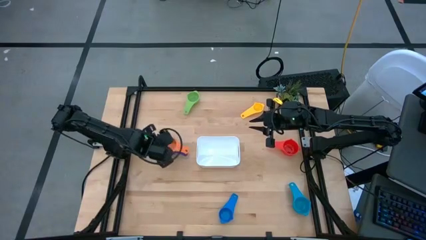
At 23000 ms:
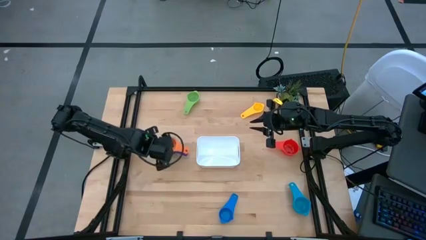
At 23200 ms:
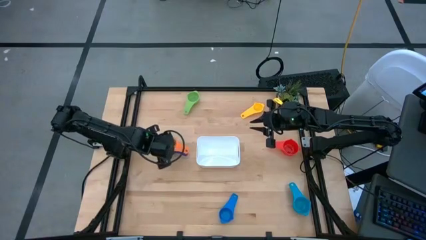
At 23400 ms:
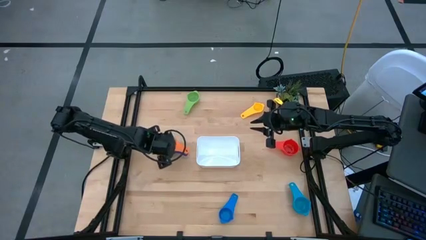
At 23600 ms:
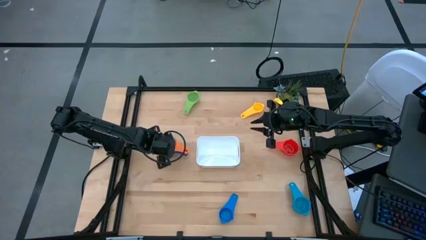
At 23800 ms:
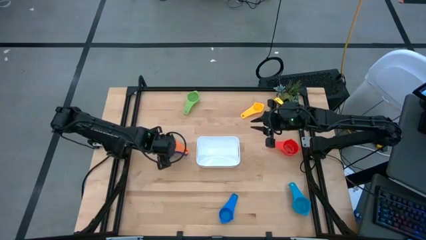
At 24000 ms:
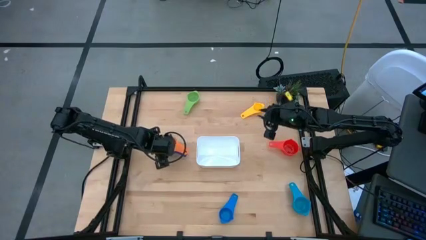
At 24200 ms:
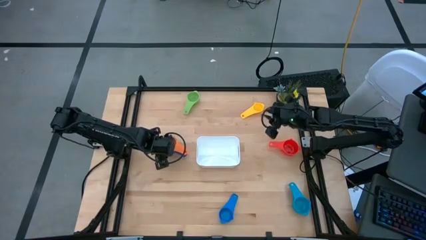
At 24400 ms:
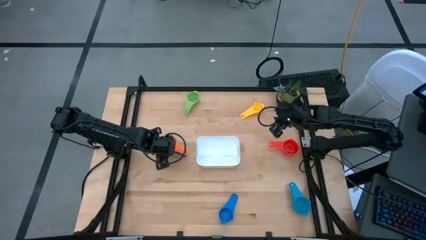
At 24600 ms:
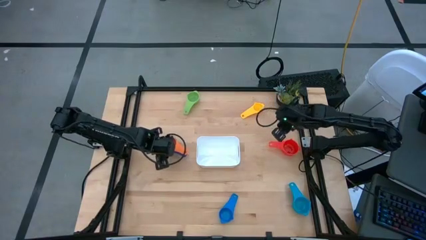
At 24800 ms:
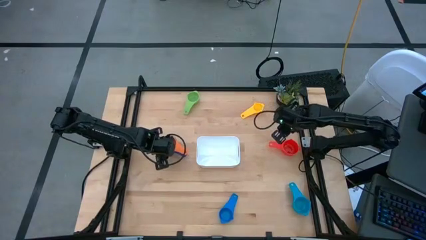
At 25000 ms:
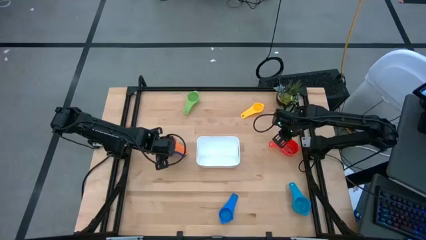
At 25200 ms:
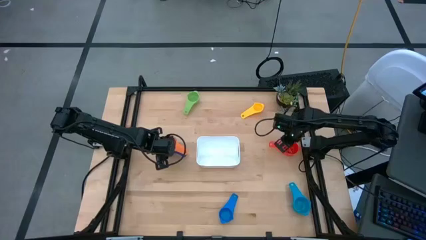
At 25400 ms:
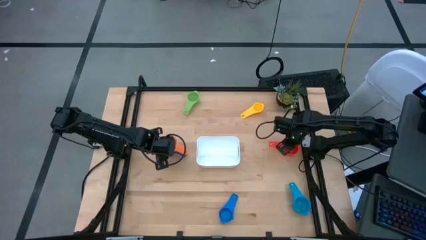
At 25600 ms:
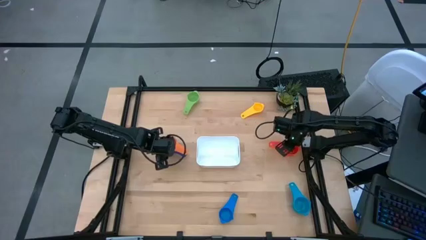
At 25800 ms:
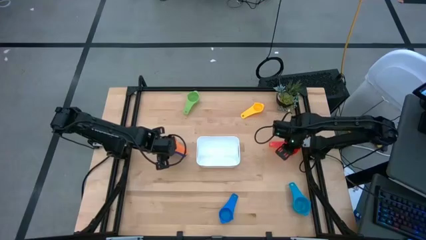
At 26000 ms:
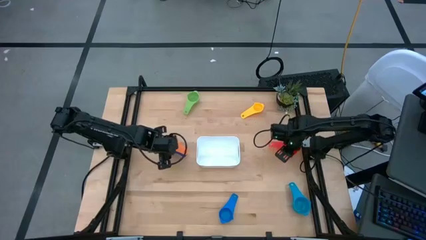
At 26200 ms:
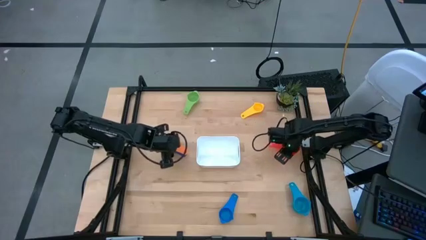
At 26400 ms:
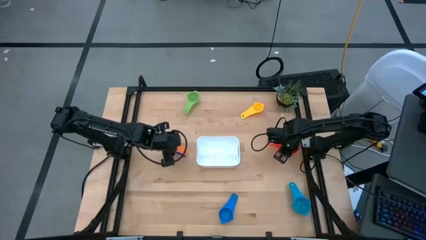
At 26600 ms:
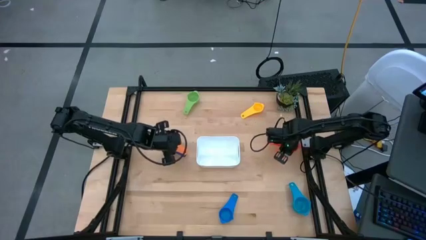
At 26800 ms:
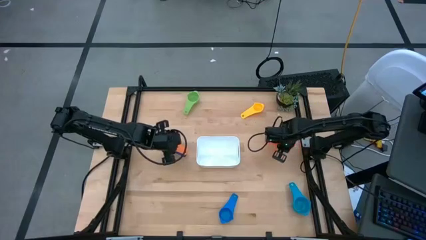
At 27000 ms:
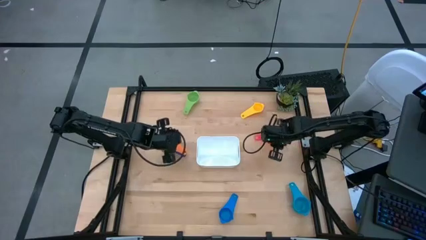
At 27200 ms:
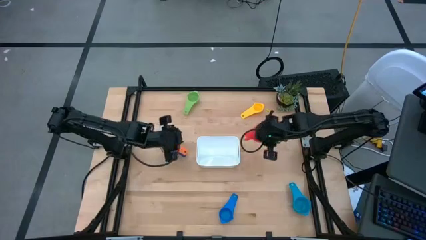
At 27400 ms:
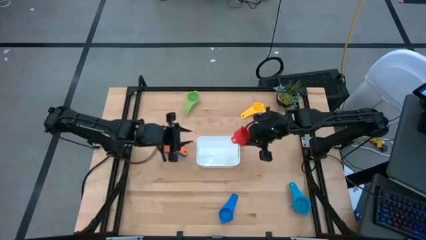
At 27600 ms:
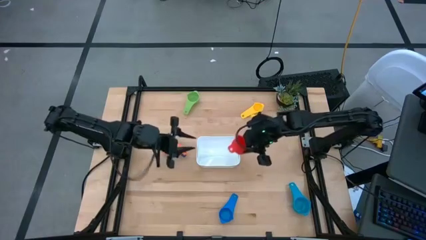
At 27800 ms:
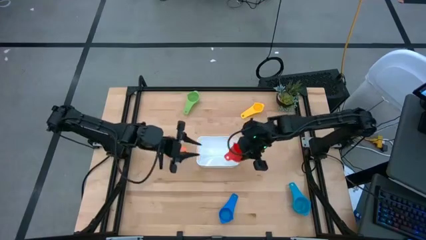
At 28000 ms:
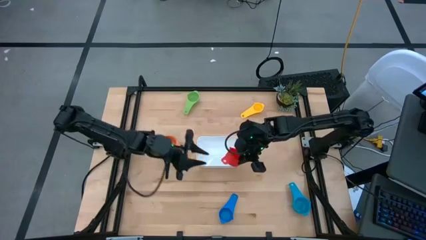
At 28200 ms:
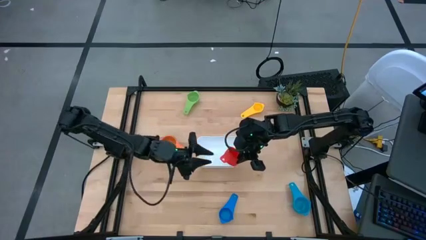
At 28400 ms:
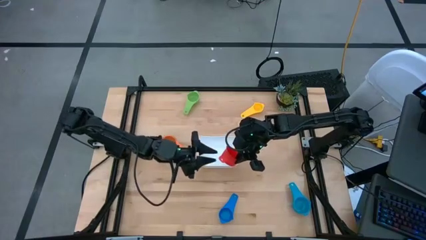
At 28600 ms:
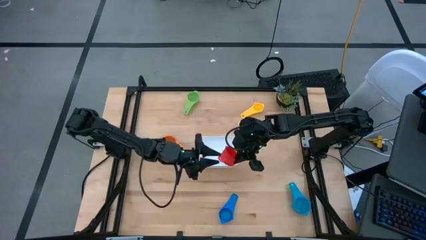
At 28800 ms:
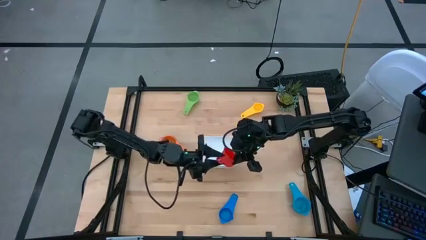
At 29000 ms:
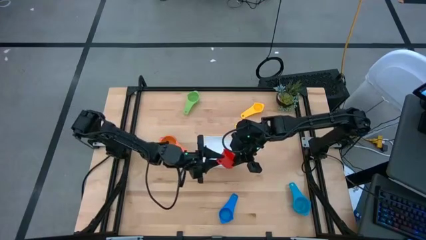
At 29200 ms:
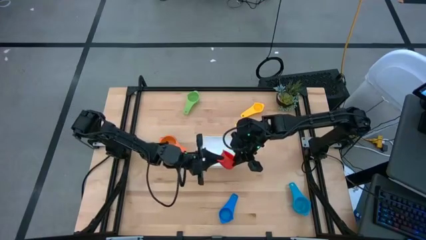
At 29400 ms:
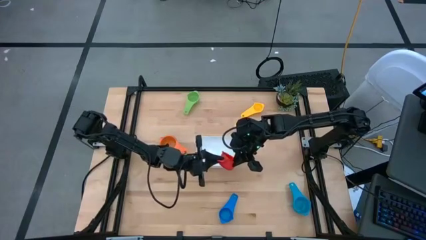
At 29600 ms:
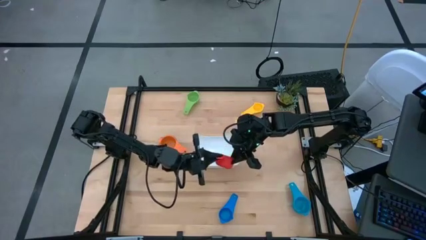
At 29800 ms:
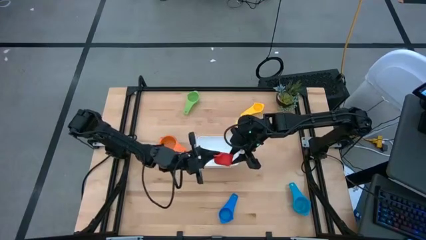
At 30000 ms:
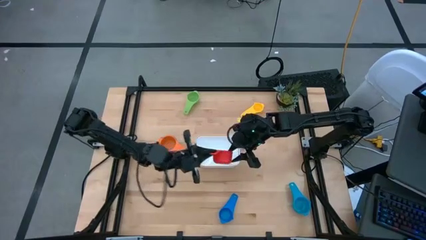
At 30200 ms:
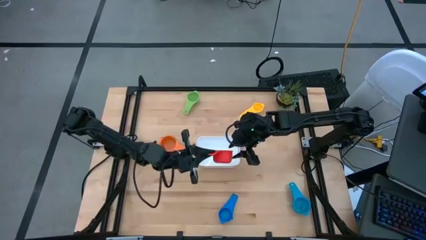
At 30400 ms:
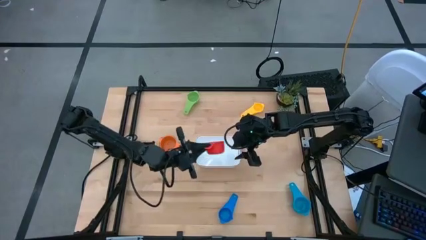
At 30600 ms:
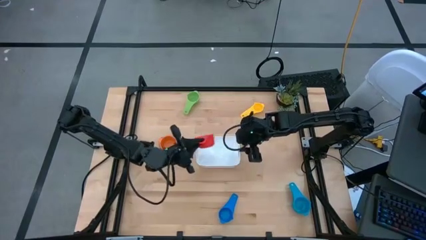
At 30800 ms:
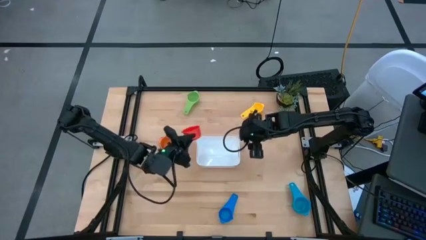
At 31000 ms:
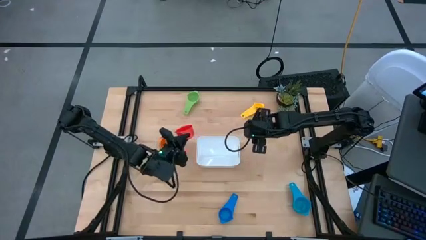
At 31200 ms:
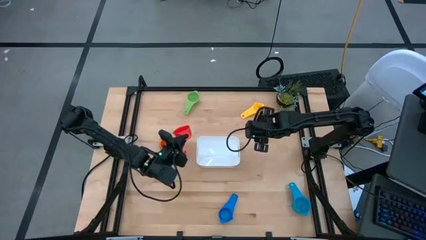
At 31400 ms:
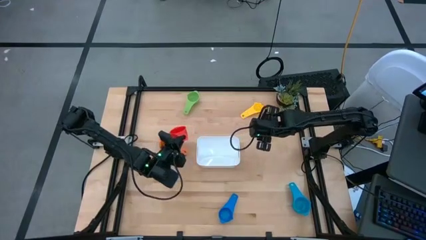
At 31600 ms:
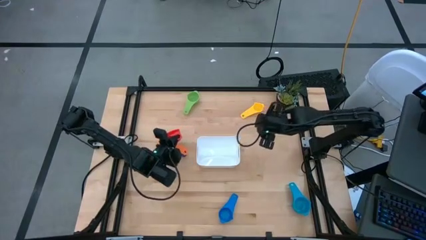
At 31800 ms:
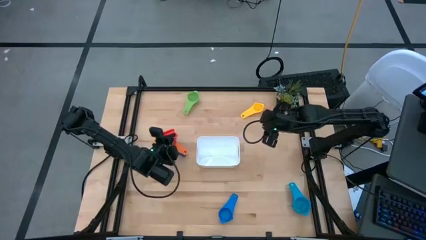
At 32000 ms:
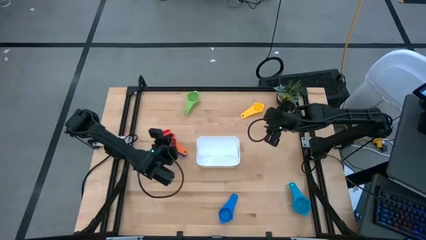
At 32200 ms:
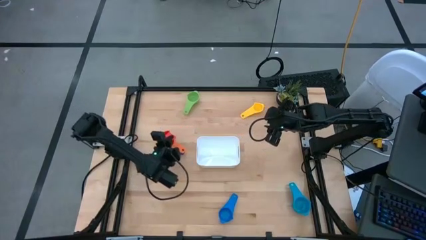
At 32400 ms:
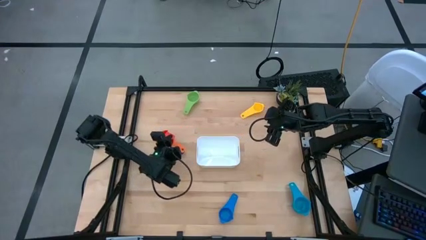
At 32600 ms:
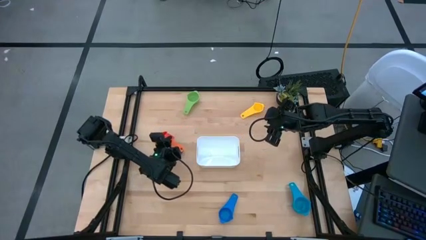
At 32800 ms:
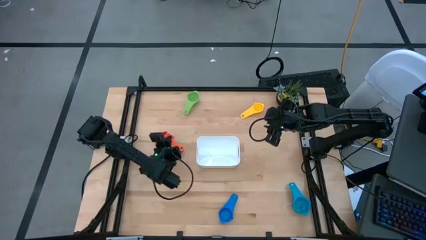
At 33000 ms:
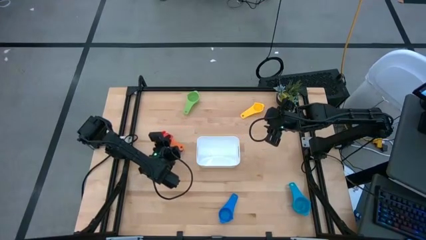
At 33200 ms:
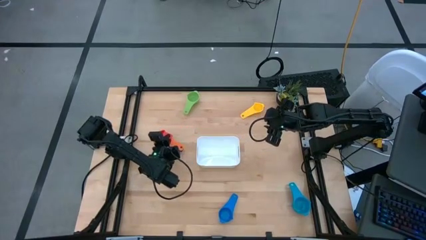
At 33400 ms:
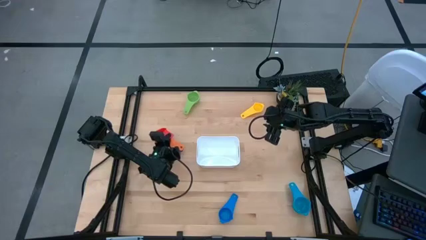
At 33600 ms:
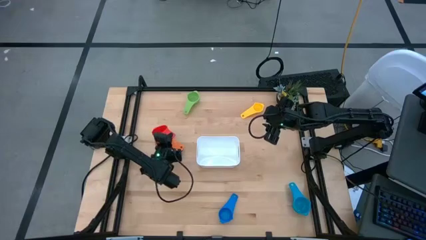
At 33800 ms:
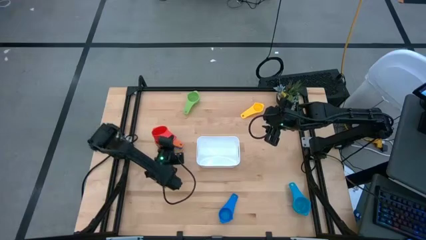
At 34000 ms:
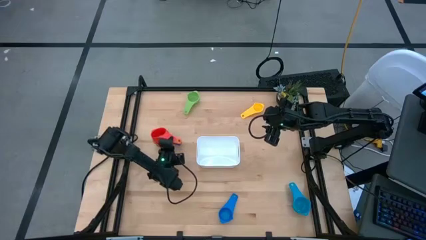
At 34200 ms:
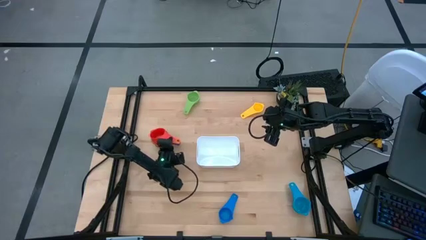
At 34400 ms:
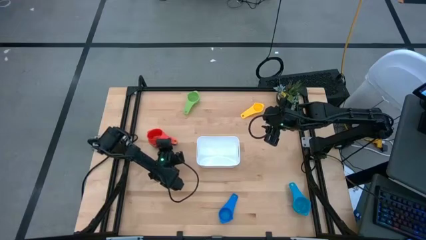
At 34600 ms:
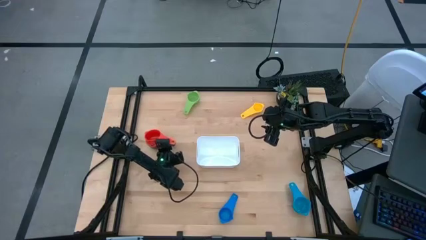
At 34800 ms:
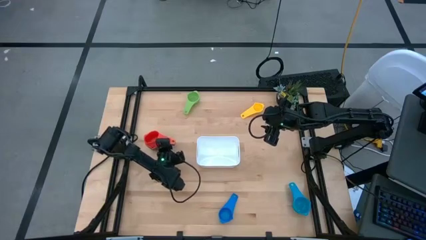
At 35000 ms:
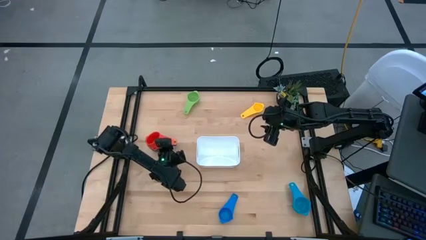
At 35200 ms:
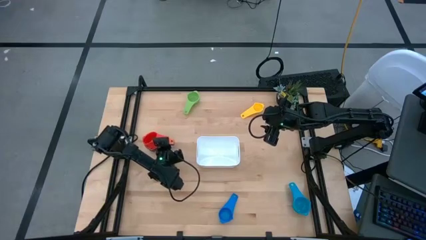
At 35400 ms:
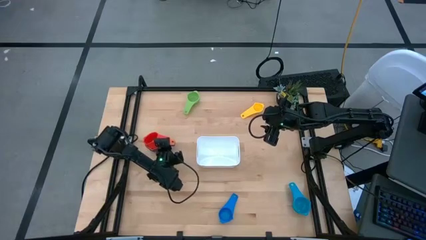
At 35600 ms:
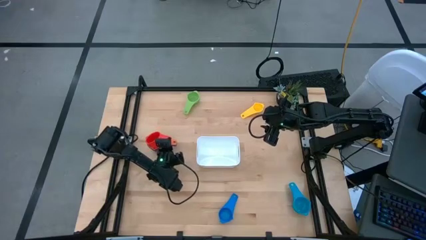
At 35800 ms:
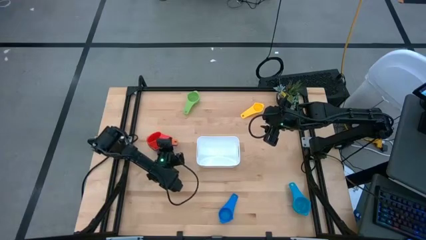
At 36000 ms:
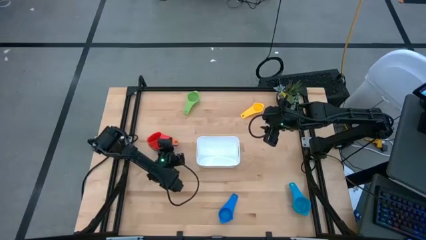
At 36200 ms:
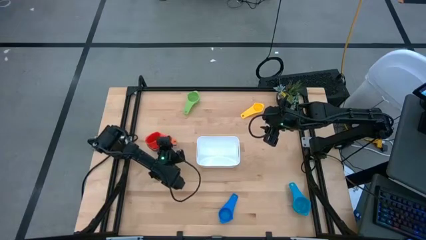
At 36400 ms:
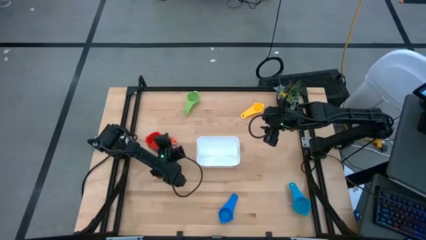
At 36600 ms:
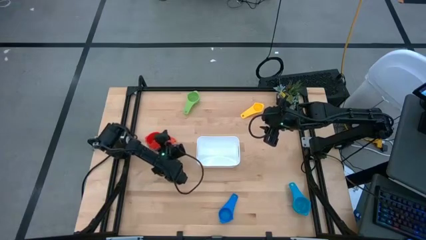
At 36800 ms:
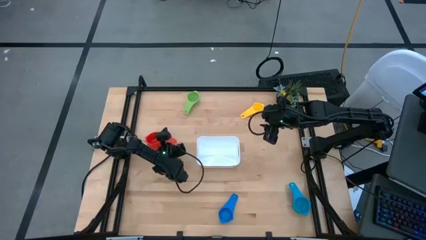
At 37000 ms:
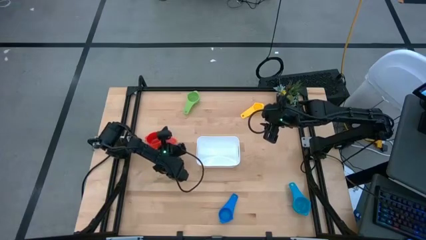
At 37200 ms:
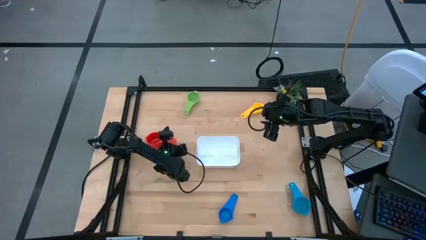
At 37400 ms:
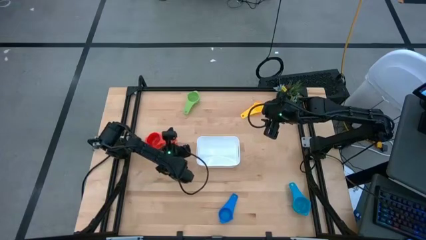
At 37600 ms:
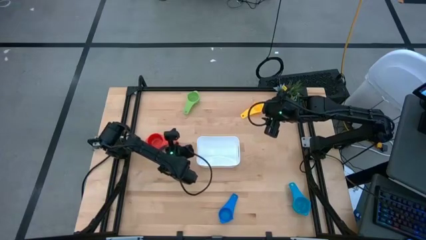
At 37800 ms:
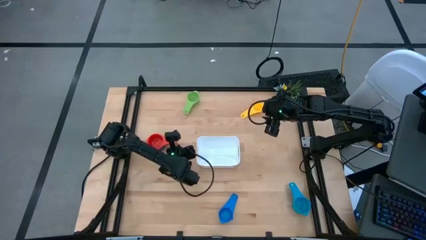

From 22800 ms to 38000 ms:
Task: Nest measuring cups in basket
Stack the red measuring cup on top of the stacked blue and orange measuring cup
